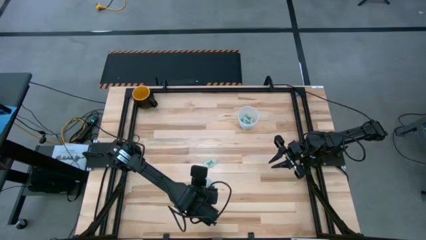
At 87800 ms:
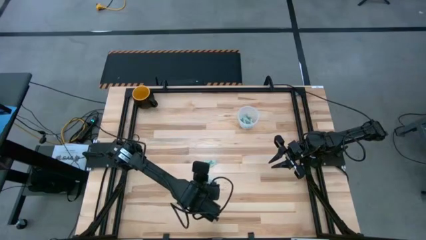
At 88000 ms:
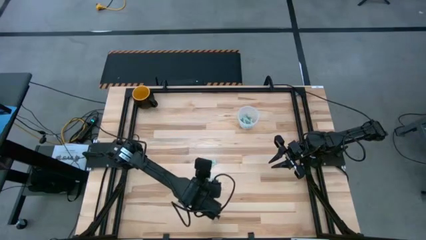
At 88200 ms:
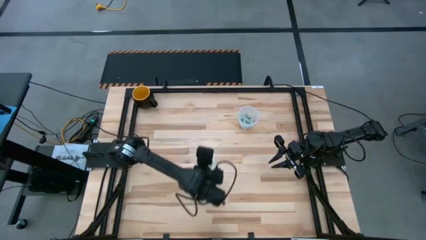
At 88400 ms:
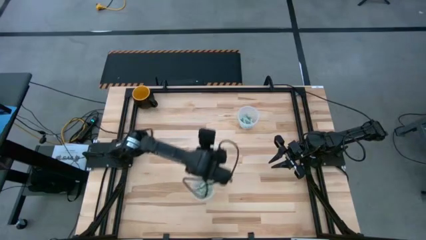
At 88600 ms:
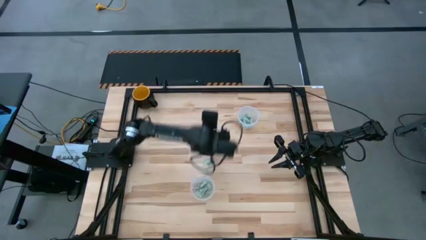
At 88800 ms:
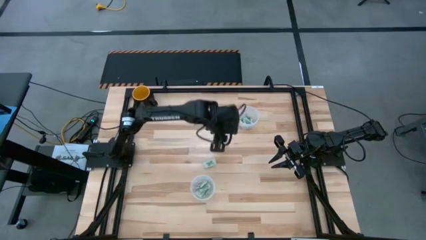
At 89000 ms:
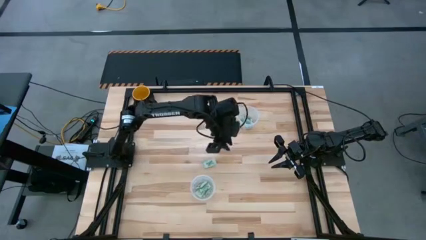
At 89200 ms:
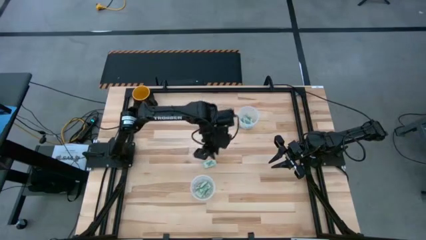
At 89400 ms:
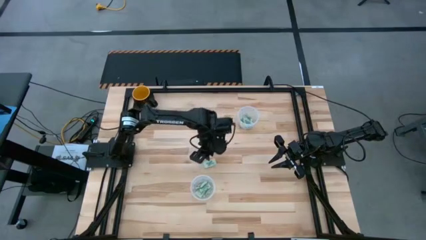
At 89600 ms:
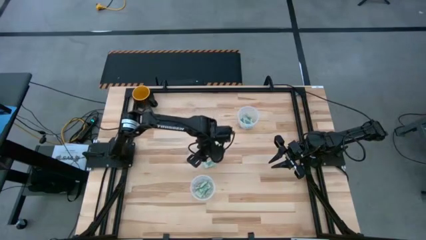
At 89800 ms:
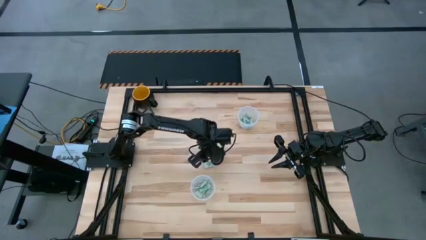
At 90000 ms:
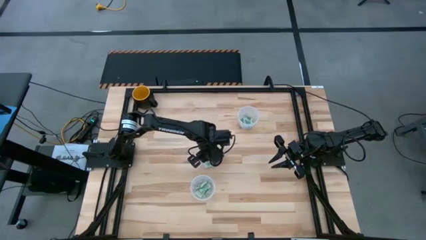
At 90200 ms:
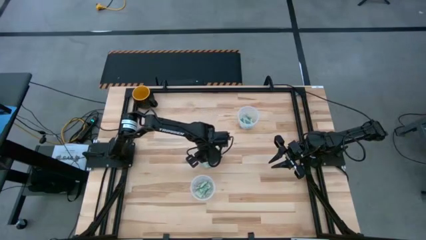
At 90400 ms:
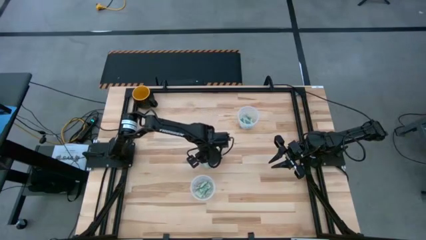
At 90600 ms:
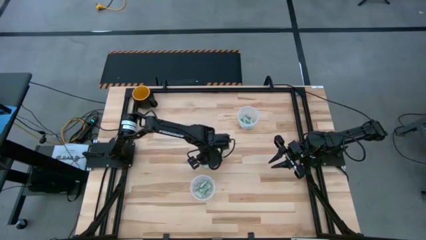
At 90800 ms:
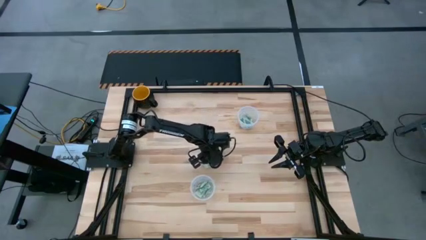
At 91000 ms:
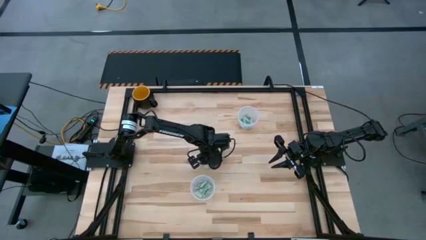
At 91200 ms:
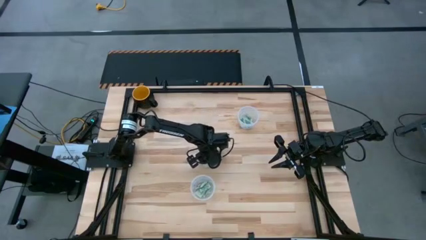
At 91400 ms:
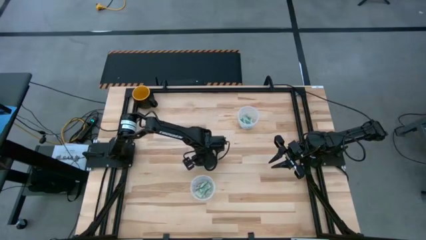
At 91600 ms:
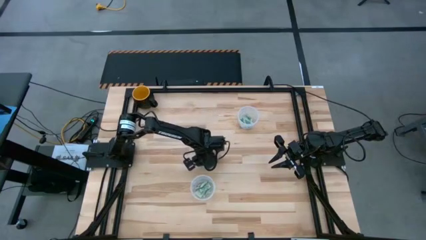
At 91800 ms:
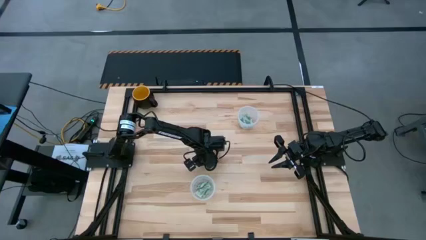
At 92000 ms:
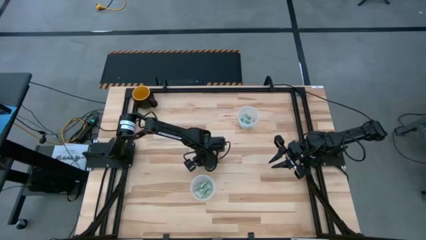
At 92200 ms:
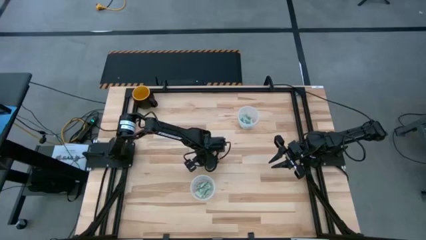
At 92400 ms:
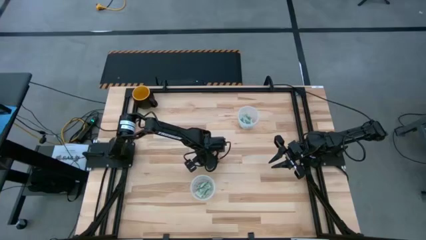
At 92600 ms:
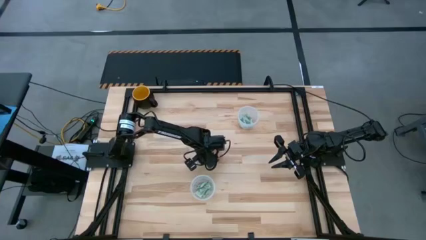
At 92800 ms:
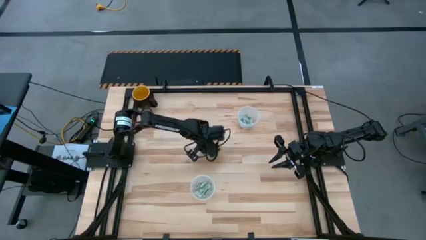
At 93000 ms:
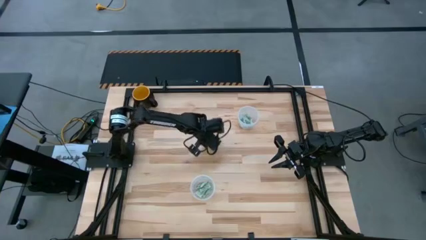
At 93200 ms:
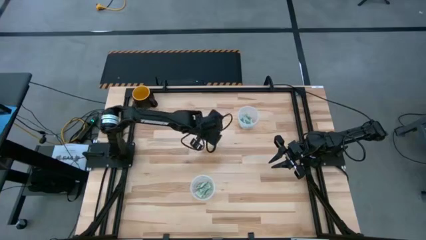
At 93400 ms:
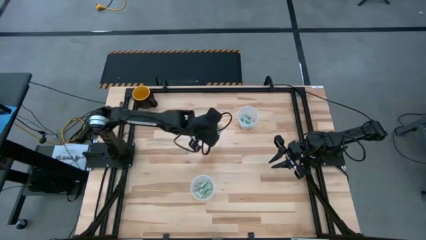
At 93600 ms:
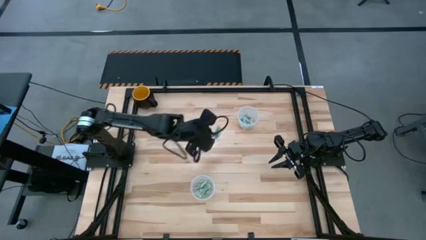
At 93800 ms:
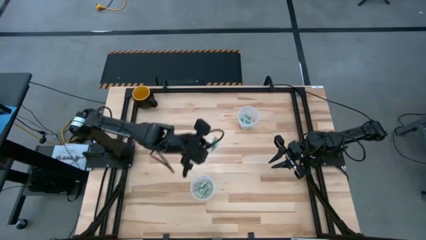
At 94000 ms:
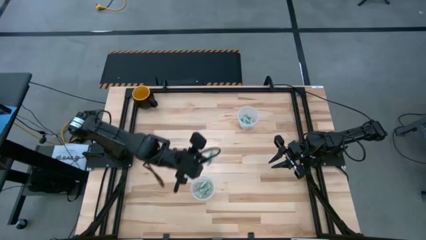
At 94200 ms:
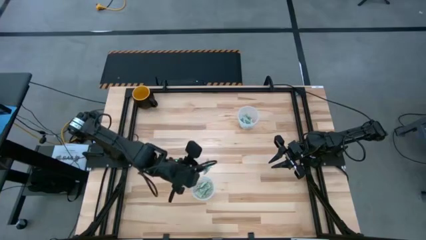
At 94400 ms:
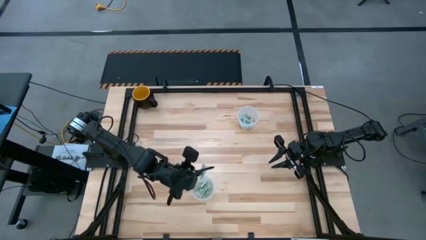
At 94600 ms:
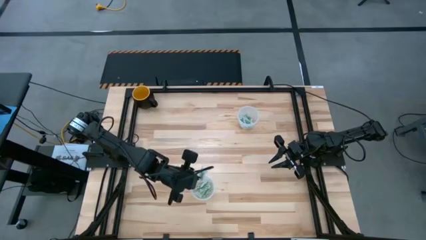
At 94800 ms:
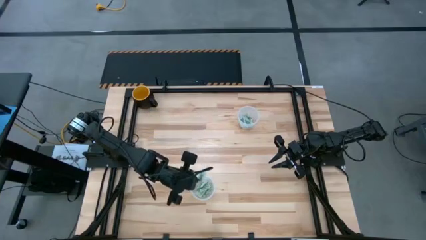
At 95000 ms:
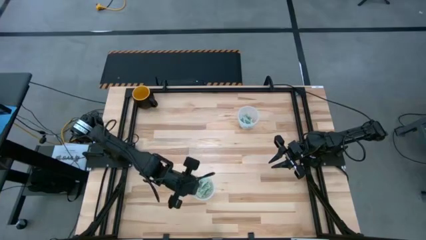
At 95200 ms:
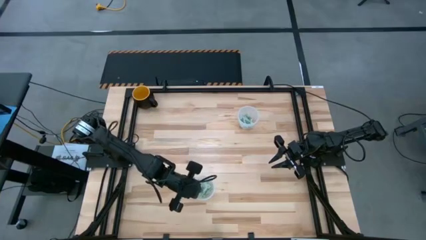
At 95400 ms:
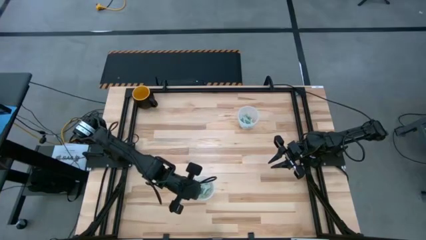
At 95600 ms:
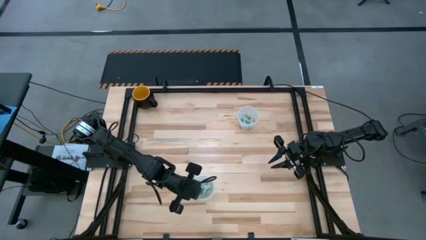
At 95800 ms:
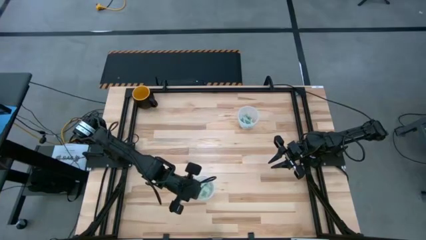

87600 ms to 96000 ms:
Task: Pick and place Stevia / Truvia into bins
Put the stevia packet into the bottom transparent container

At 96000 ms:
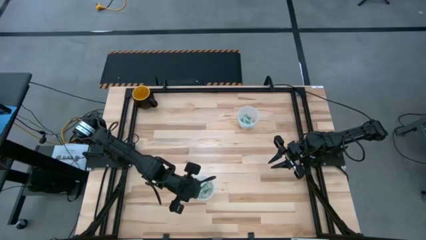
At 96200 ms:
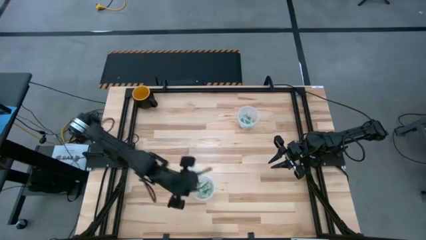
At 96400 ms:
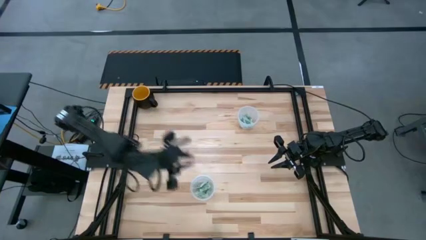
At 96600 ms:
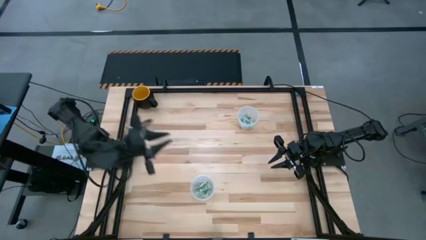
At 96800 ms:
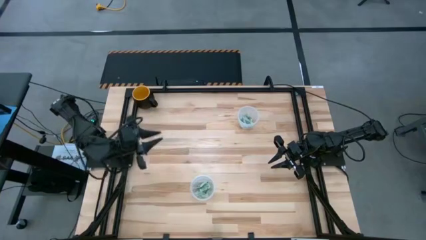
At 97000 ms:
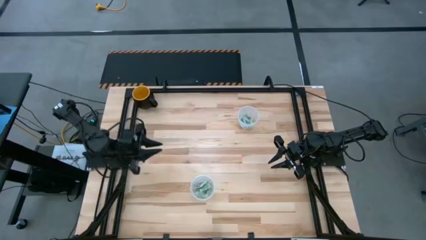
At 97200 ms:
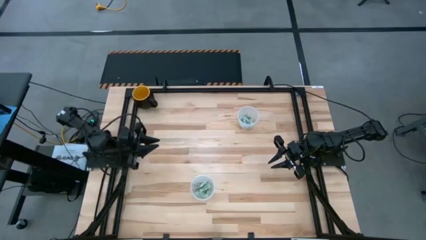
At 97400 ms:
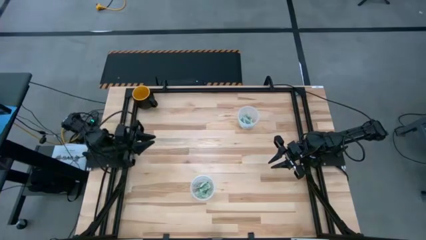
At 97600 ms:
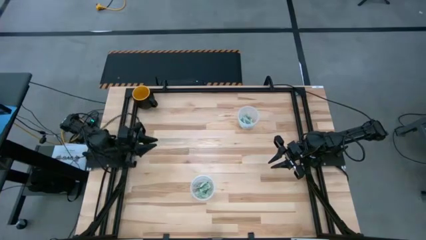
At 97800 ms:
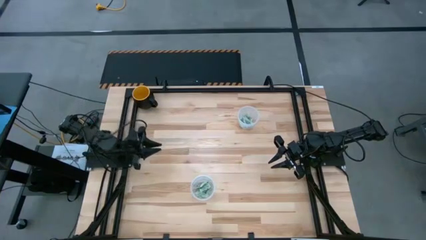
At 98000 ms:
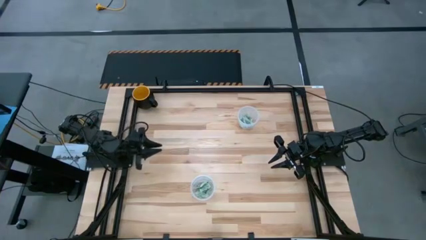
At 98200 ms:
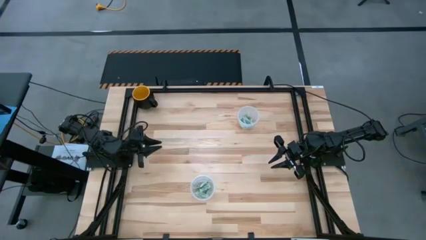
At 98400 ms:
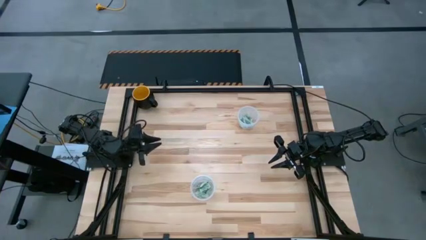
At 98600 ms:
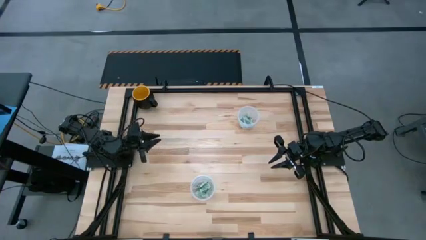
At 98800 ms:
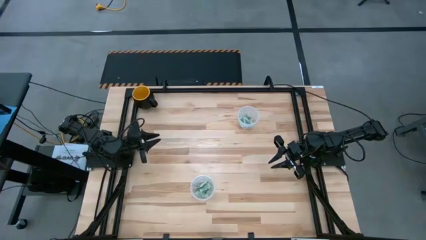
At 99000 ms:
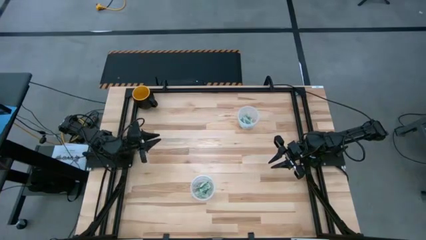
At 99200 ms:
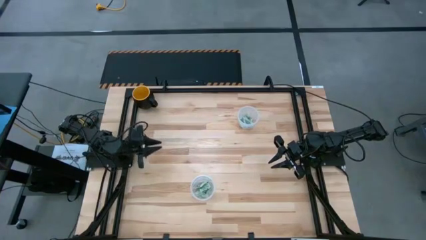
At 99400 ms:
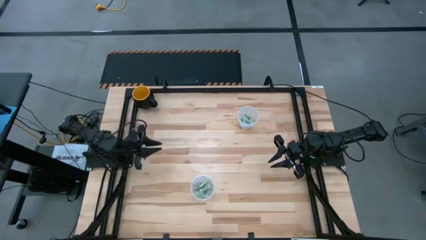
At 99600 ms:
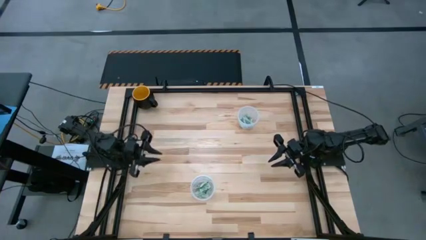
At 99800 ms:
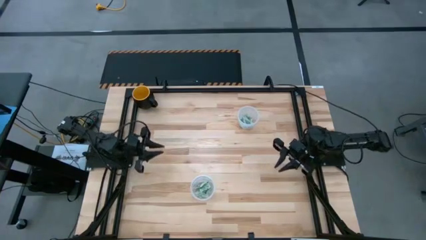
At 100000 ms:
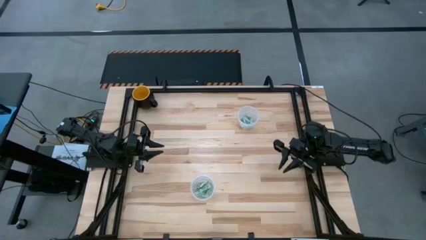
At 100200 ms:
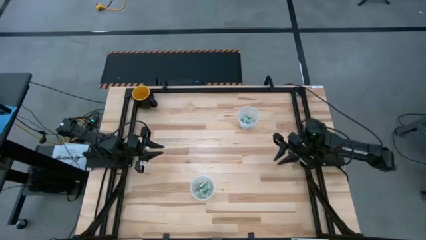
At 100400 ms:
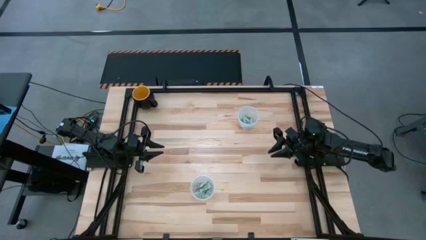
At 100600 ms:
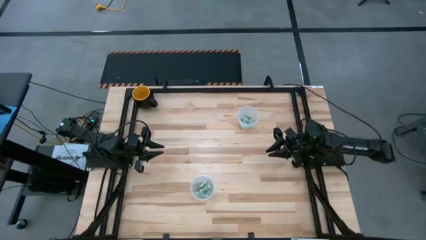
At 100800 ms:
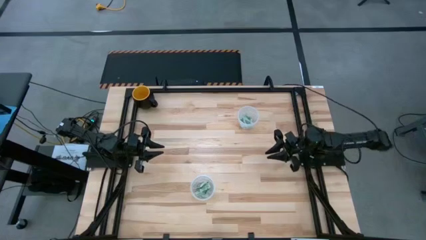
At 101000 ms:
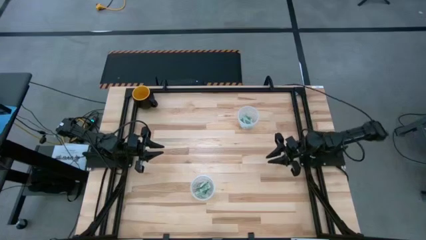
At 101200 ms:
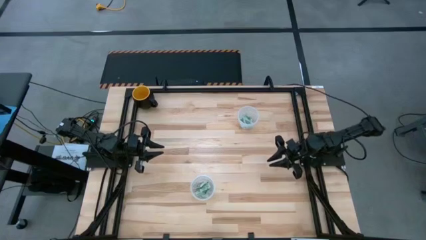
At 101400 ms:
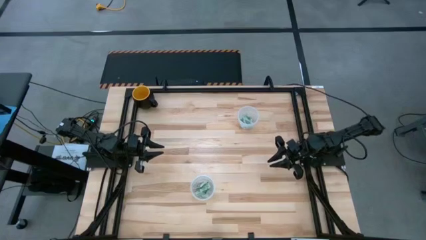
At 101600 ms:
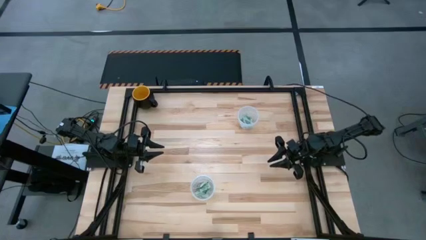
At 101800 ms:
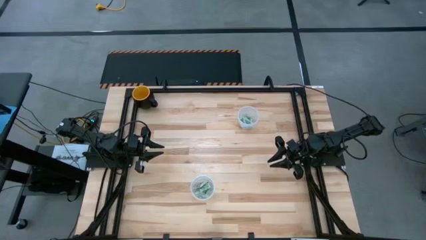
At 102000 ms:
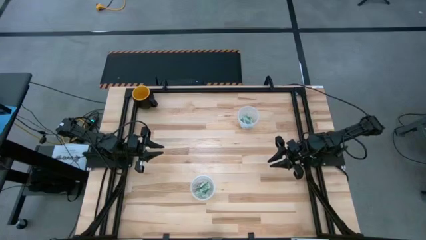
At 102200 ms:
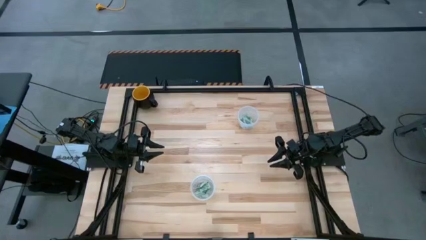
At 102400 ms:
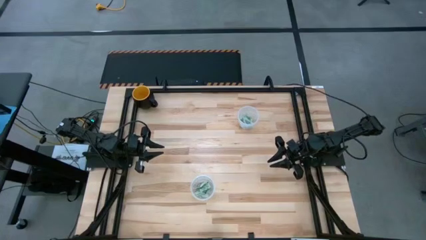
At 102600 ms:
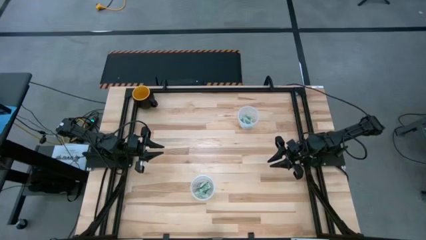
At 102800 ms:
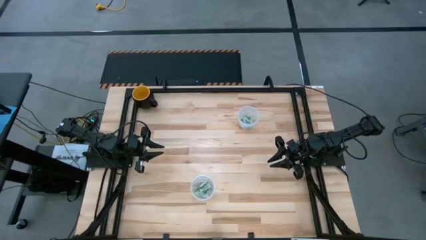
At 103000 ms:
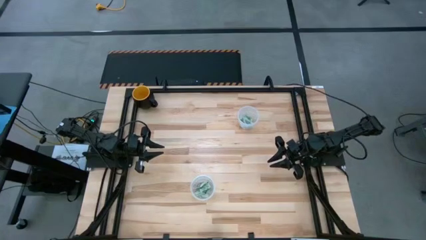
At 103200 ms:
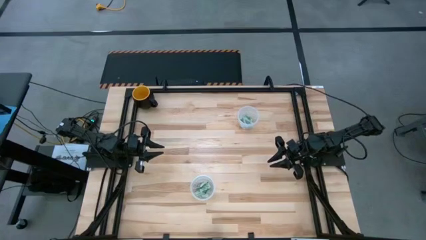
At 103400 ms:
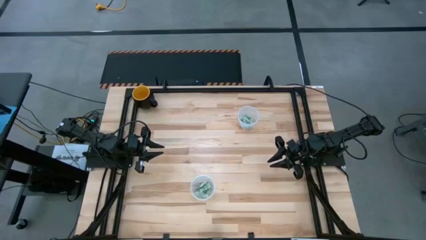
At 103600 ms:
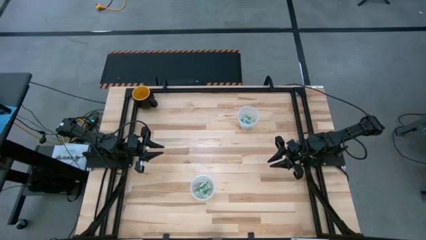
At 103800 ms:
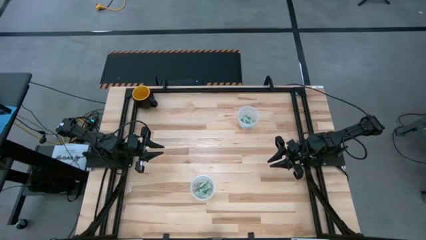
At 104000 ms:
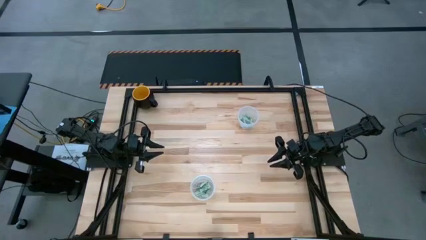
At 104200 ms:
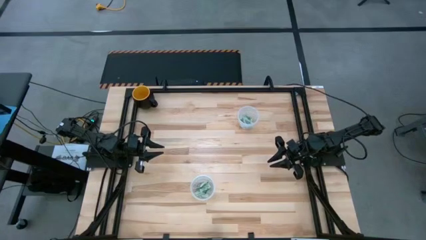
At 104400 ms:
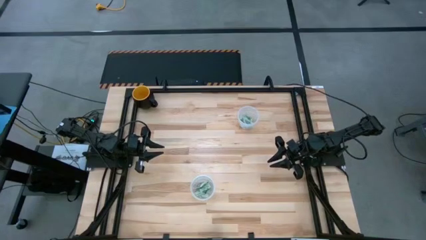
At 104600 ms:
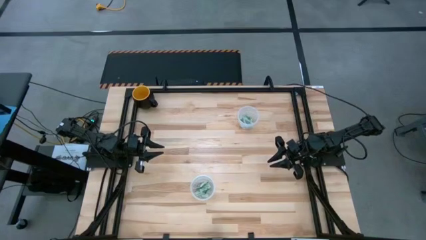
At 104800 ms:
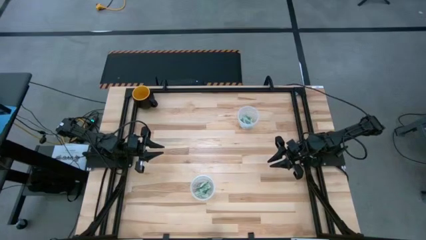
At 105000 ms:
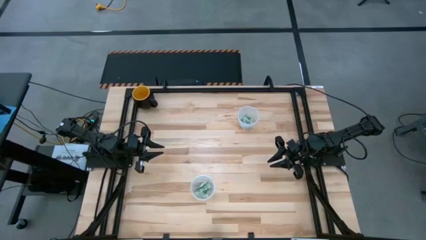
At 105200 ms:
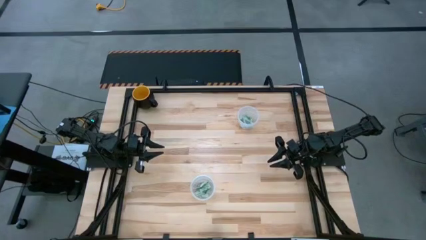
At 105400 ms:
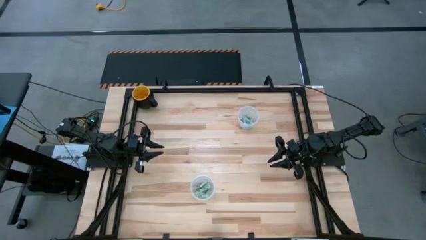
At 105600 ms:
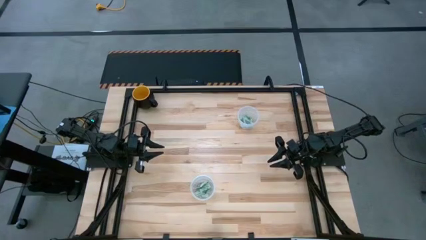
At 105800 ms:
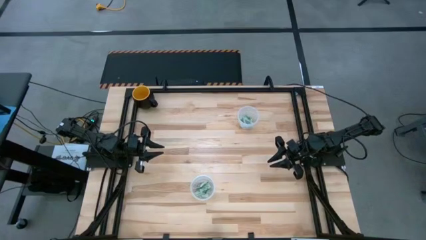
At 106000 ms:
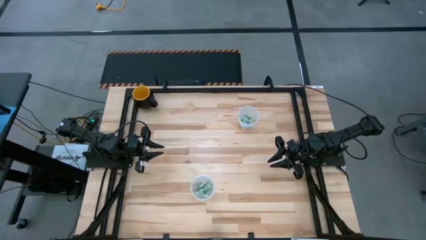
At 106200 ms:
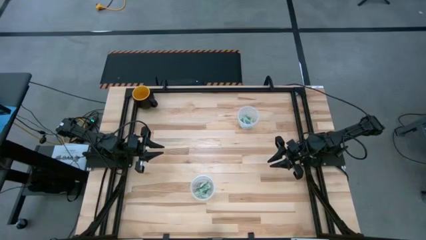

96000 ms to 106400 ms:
Return to Home Position
